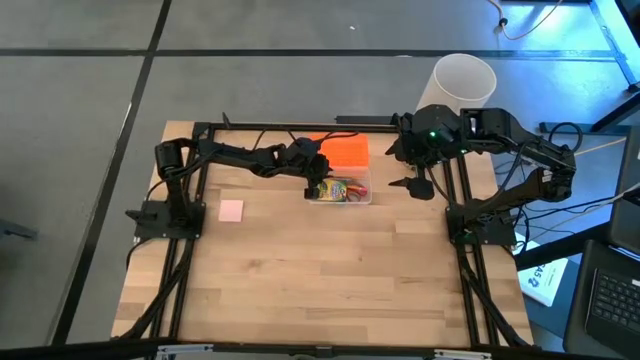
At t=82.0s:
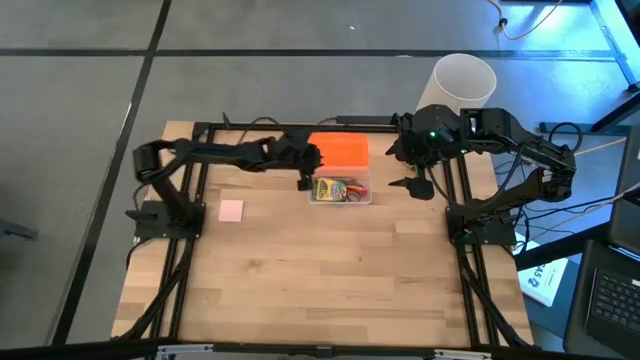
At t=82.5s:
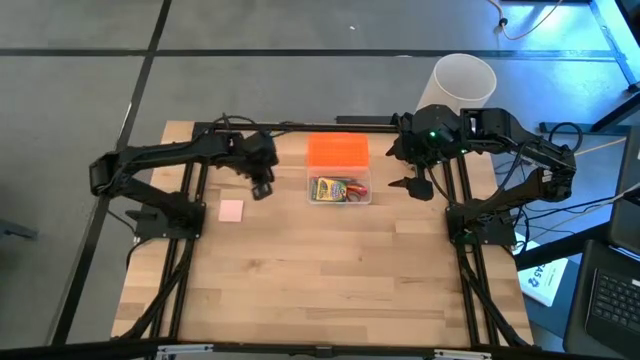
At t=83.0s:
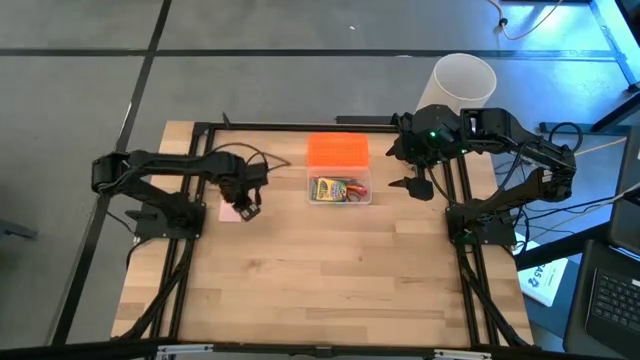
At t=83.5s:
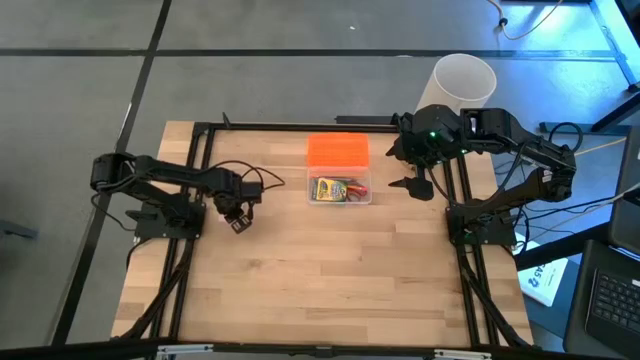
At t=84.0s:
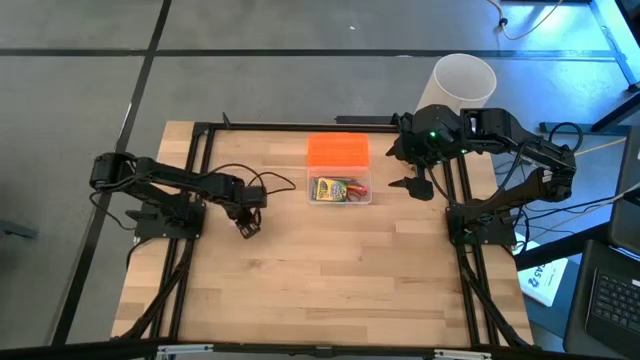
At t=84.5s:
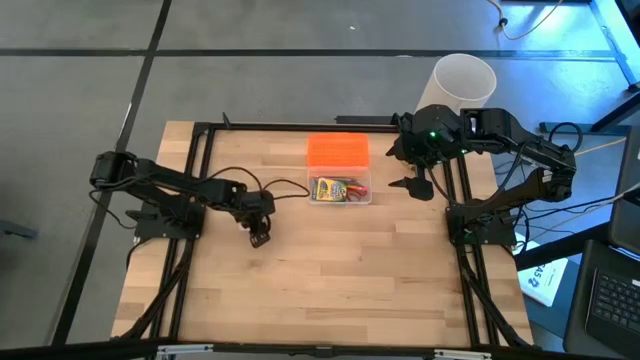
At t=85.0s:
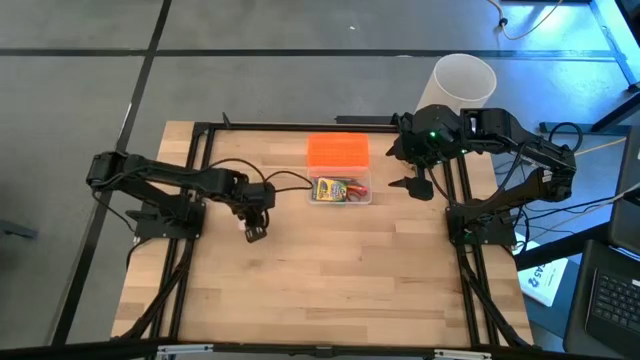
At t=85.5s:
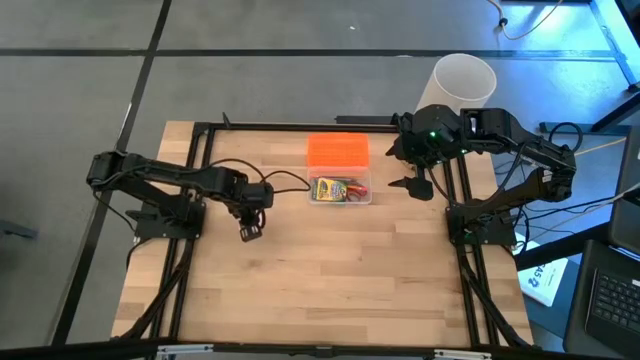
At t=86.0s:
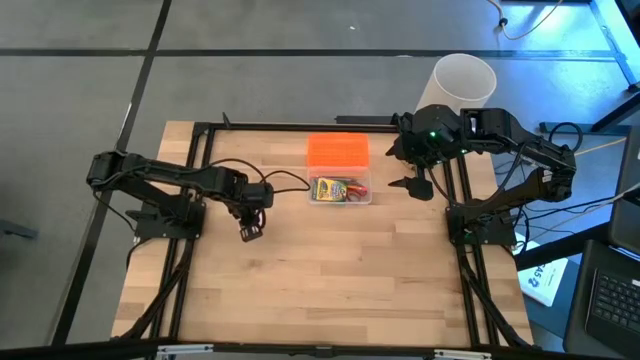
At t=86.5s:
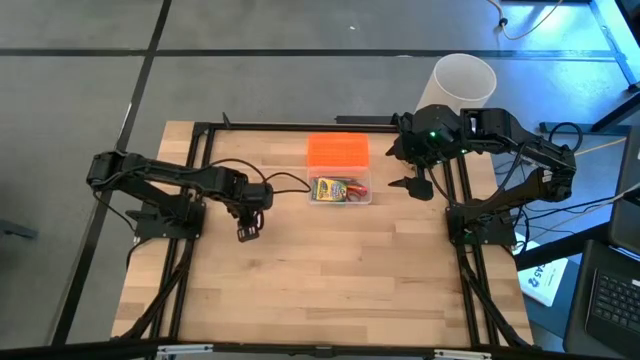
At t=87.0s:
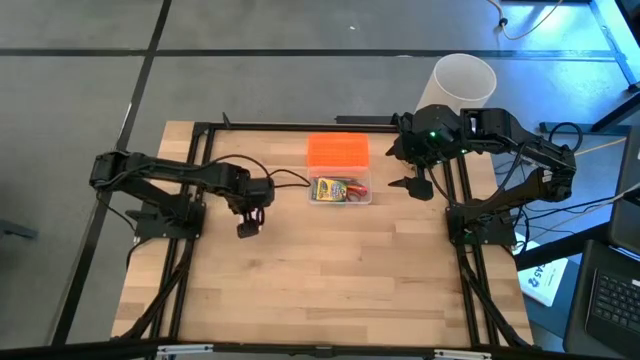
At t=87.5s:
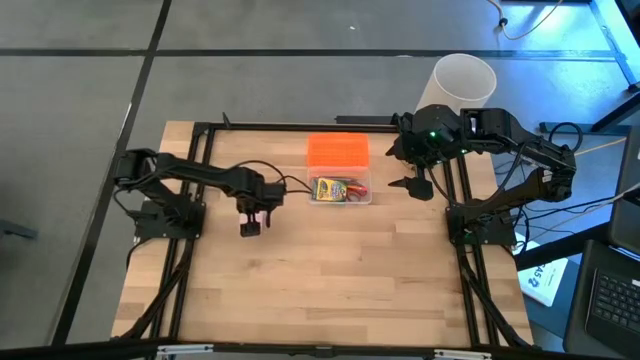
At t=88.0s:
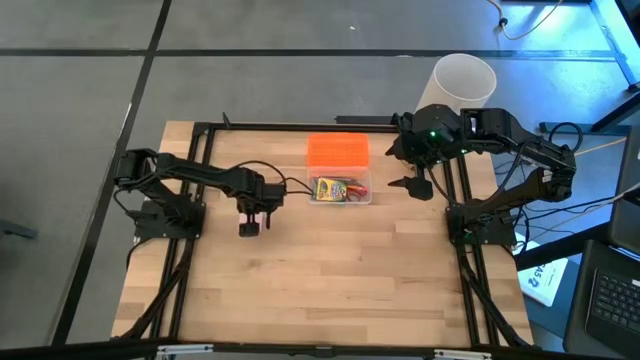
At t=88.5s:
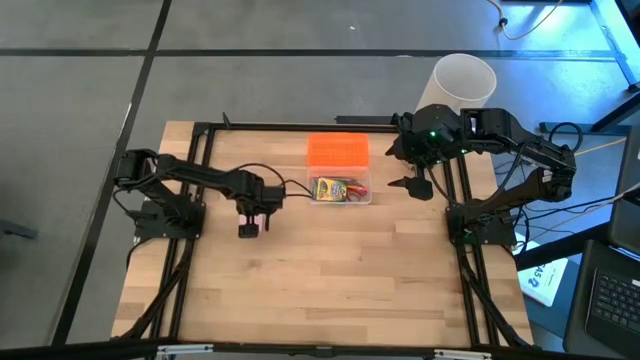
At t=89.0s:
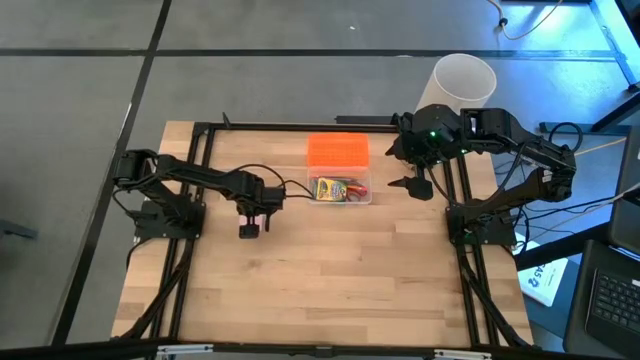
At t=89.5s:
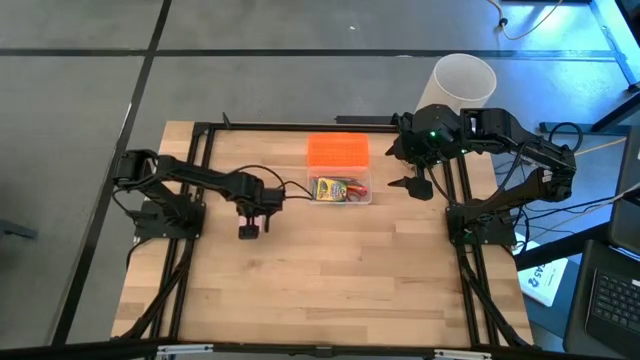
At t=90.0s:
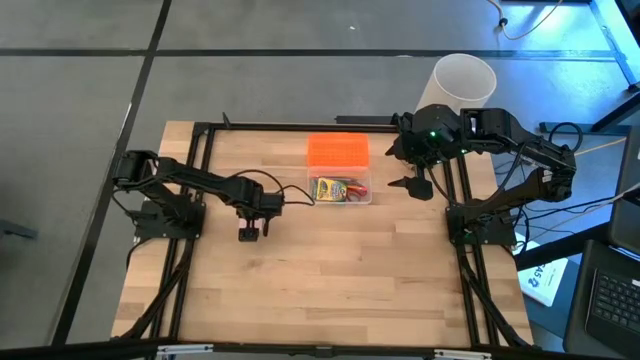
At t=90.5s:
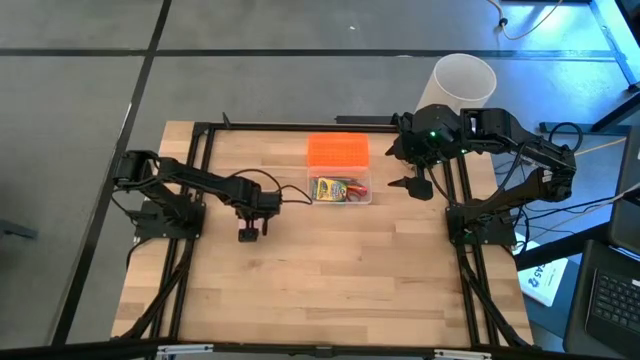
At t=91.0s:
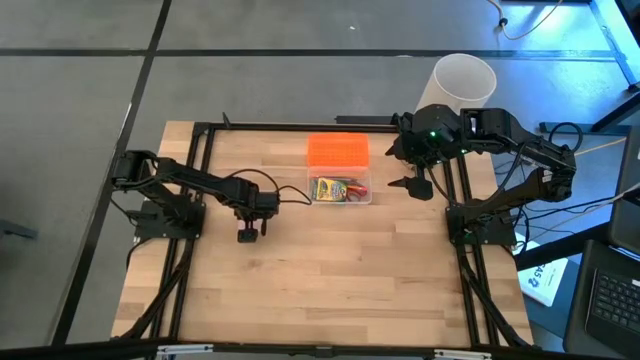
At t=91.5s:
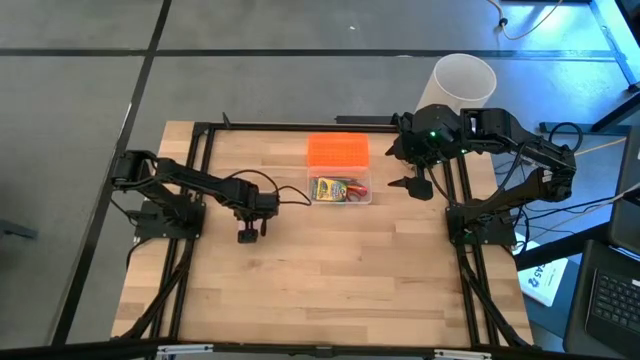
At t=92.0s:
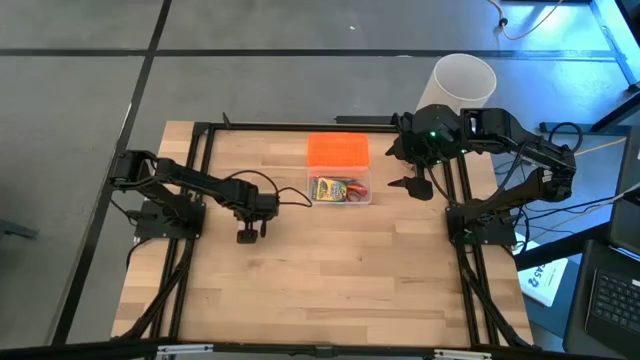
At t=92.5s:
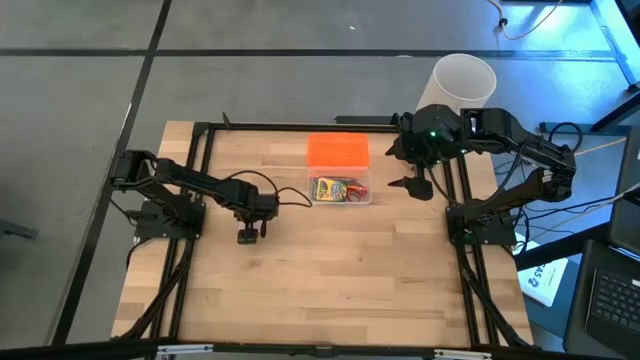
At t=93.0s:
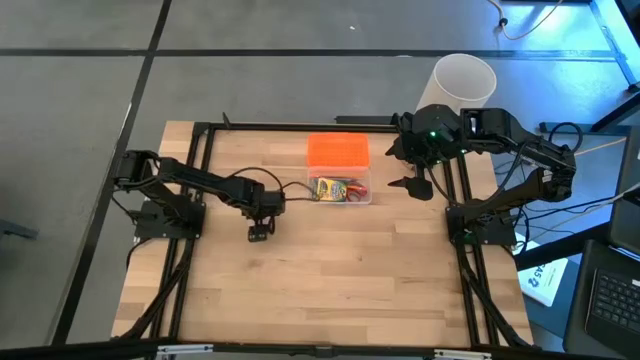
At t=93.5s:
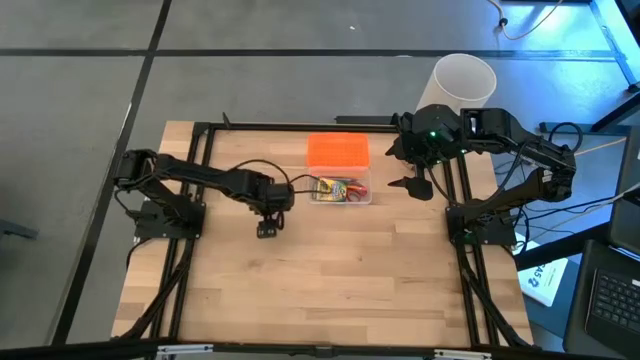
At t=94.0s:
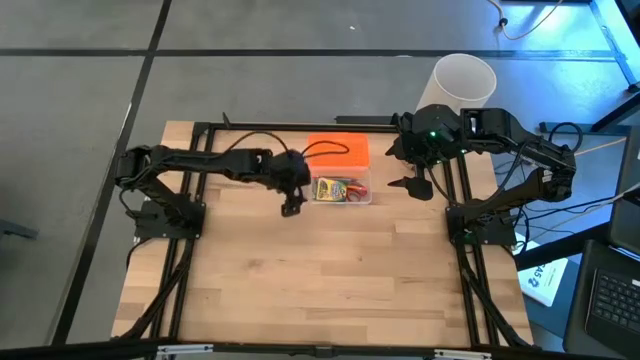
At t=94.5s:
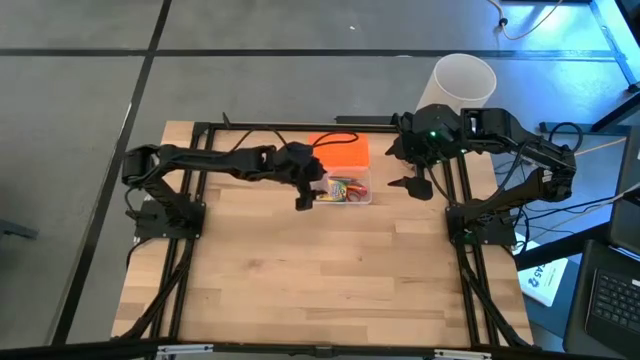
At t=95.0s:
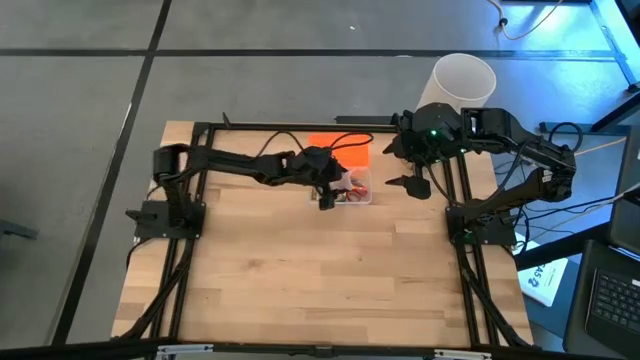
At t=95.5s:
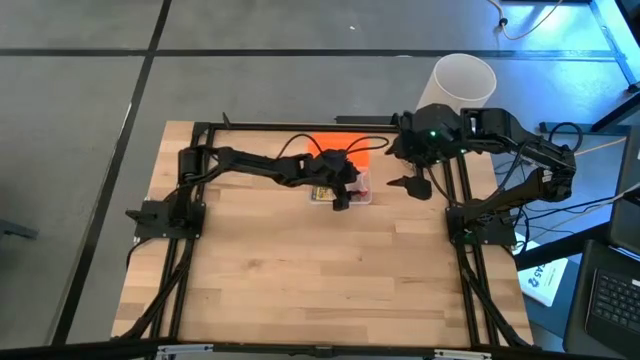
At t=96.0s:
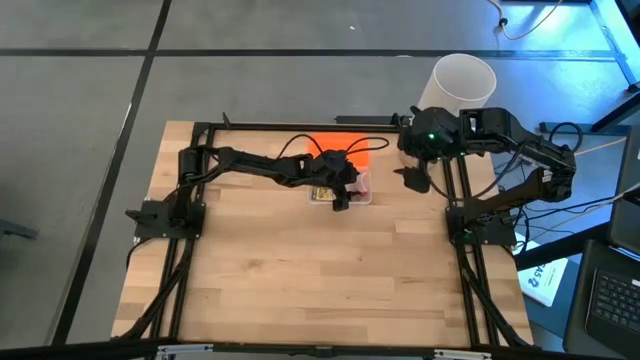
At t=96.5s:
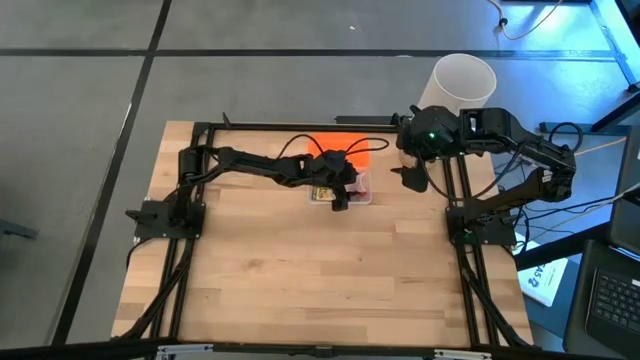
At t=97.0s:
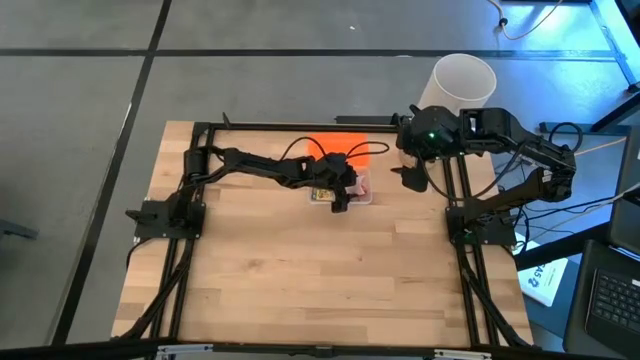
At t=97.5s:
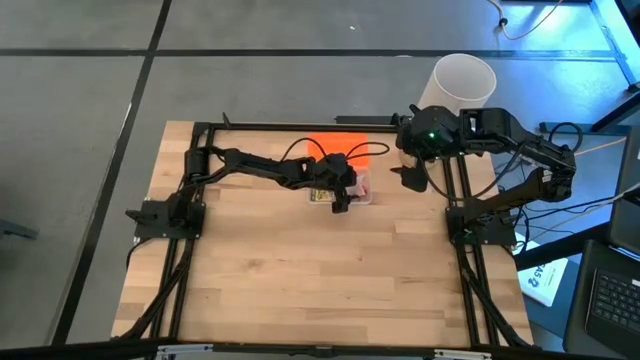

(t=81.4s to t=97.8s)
Task: Pack school essentials
Put the pink sticky notes into the orange supply box

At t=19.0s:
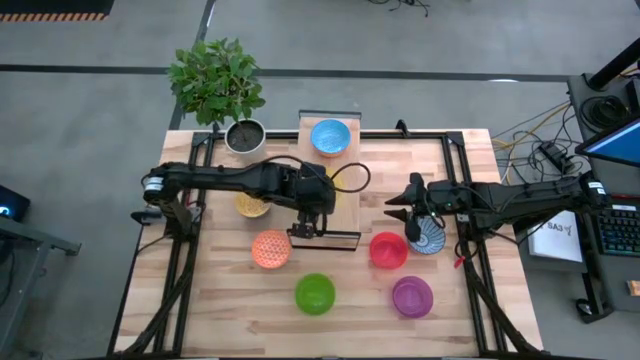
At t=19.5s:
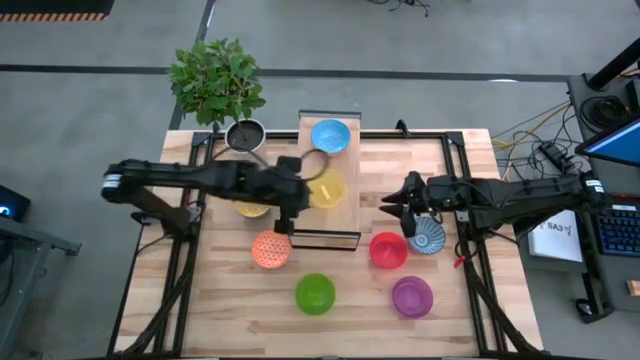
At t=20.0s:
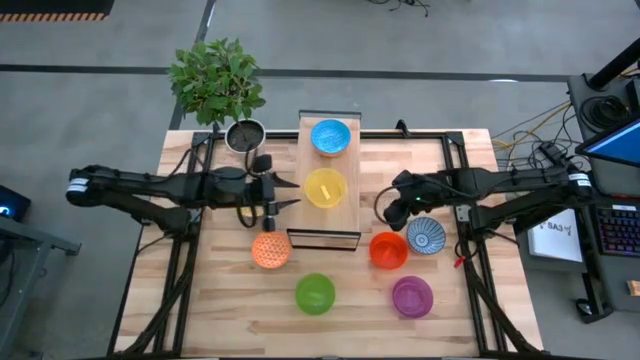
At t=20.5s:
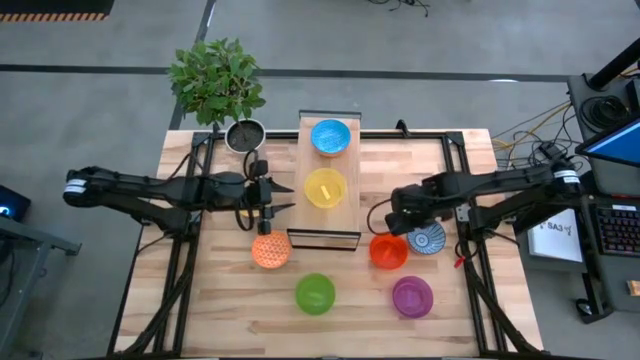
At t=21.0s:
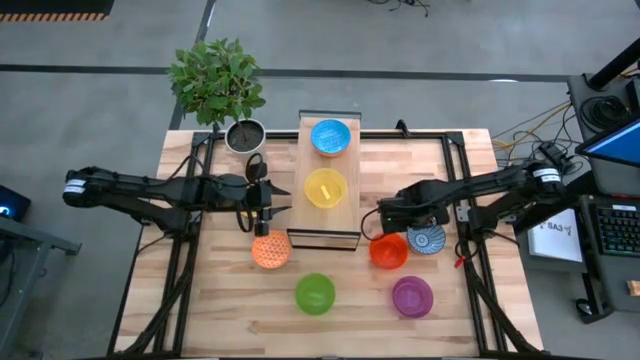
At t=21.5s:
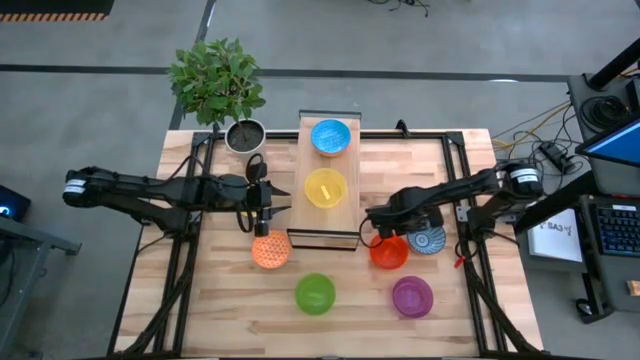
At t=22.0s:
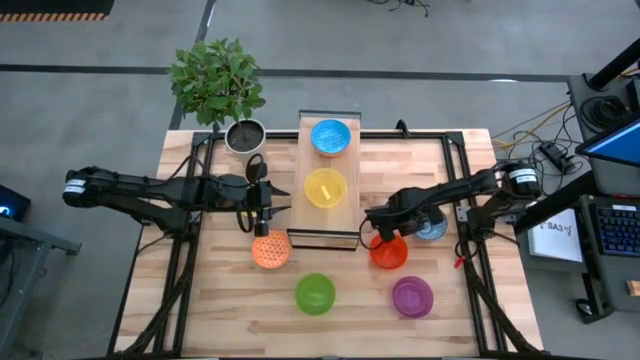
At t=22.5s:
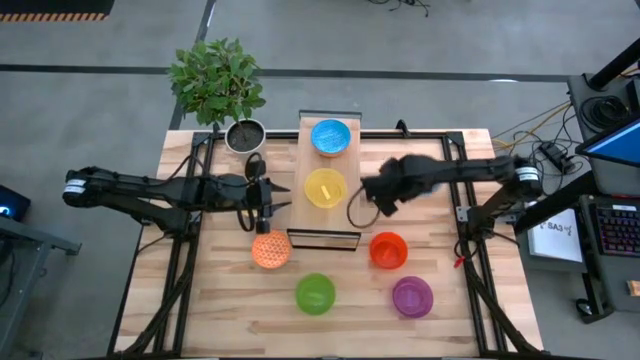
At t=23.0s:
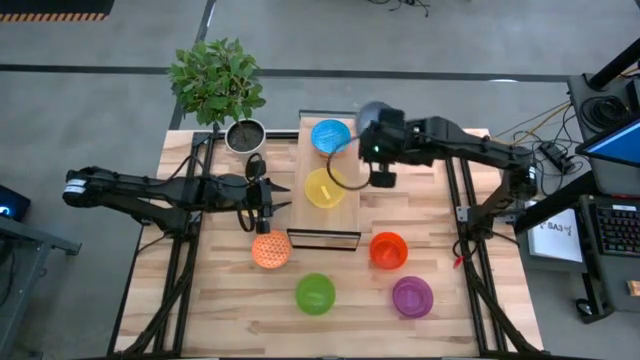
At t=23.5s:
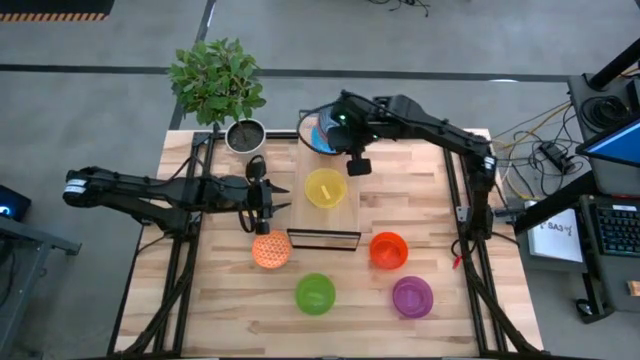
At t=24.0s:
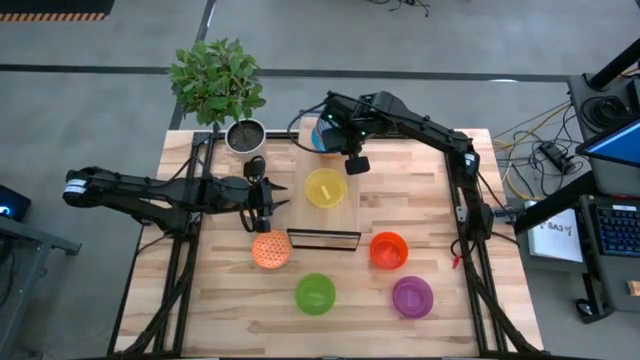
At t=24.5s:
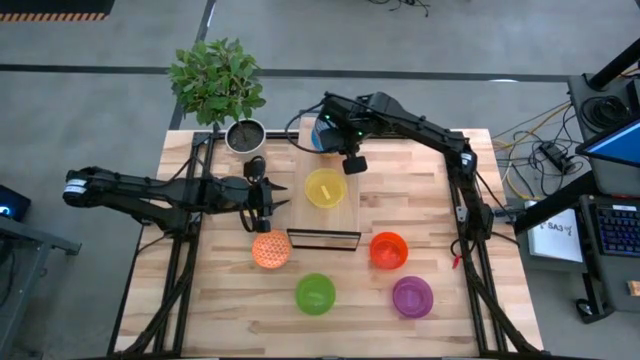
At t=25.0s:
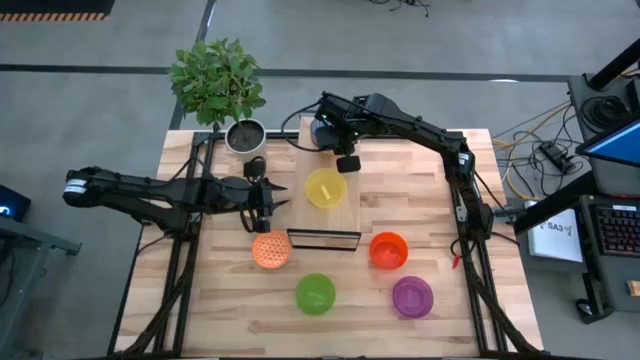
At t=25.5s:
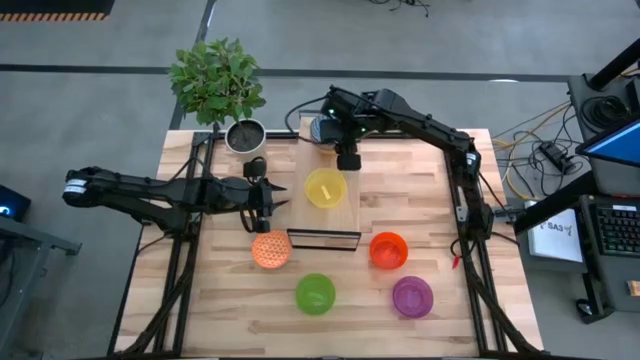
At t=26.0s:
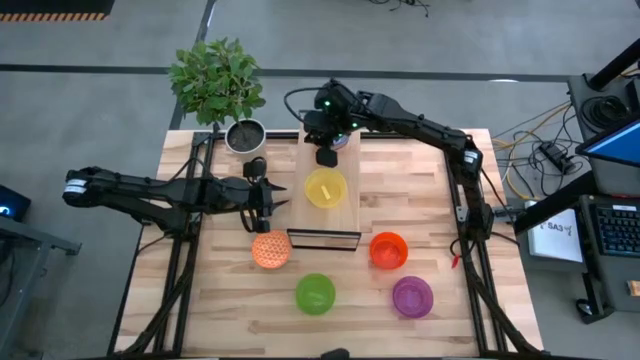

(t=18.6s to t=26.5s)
Task: Place and stack bowls onto a shelf
Stack the blue patterned bowl on top of the light blue bowl on the shelf
